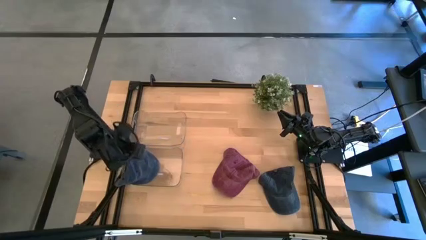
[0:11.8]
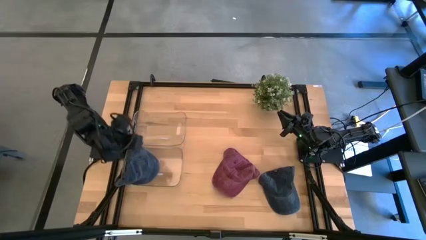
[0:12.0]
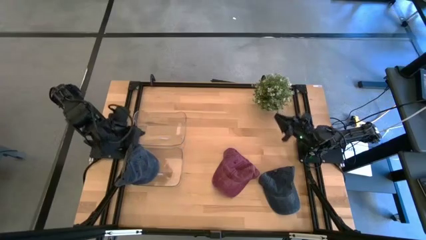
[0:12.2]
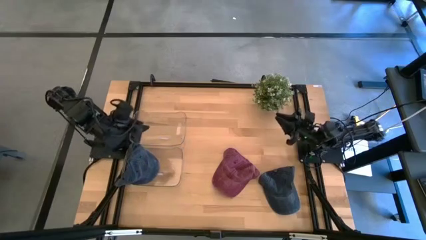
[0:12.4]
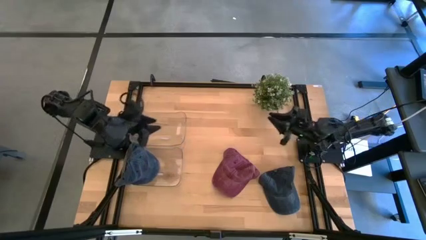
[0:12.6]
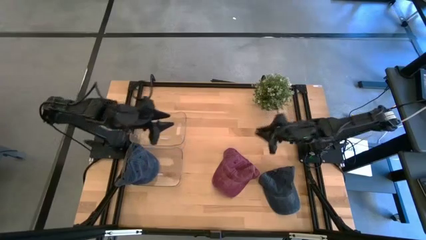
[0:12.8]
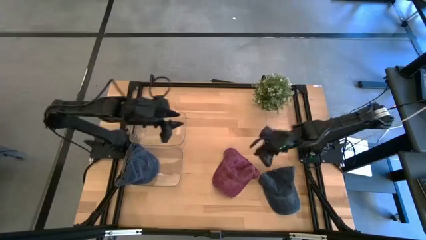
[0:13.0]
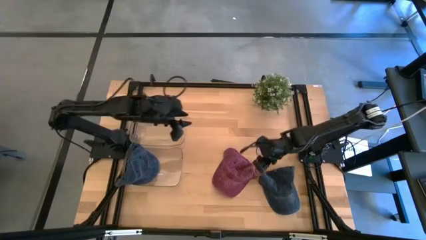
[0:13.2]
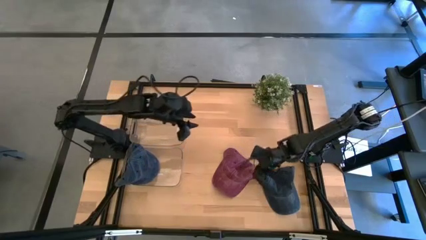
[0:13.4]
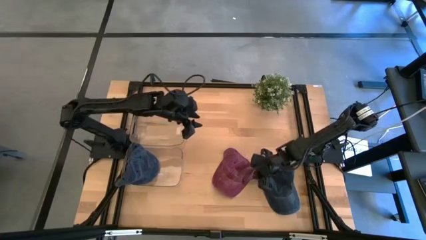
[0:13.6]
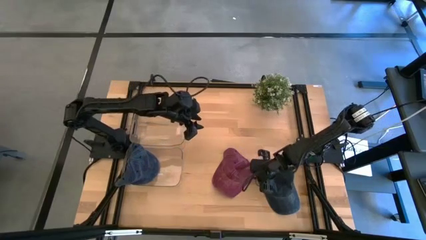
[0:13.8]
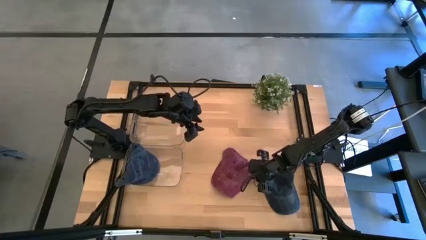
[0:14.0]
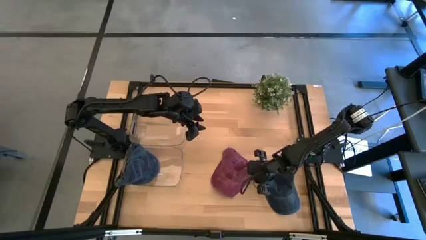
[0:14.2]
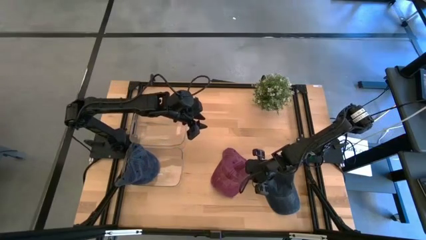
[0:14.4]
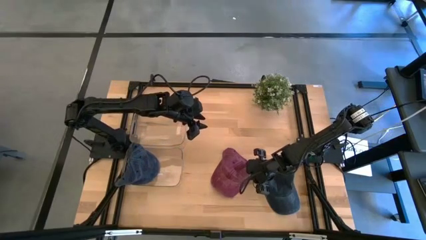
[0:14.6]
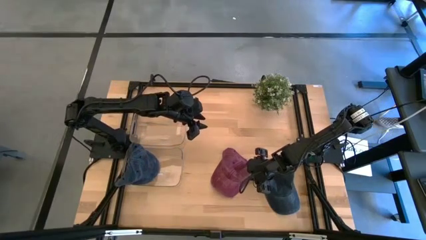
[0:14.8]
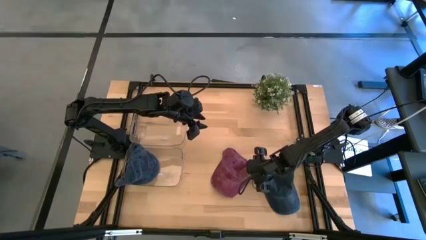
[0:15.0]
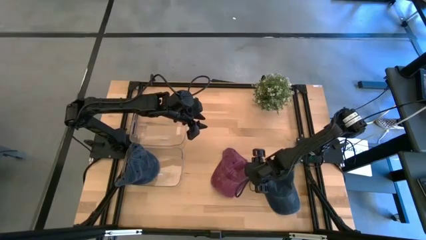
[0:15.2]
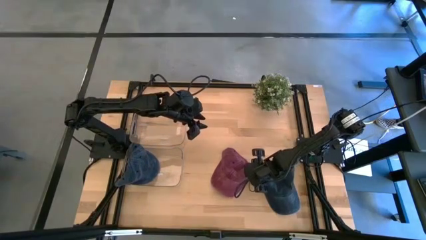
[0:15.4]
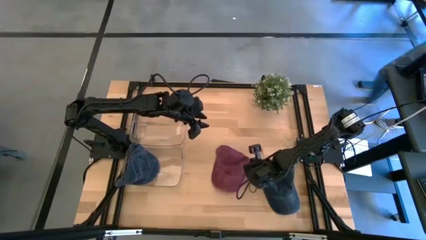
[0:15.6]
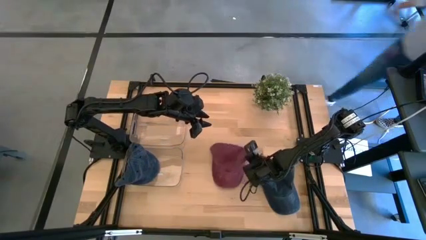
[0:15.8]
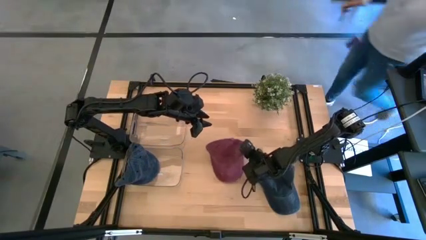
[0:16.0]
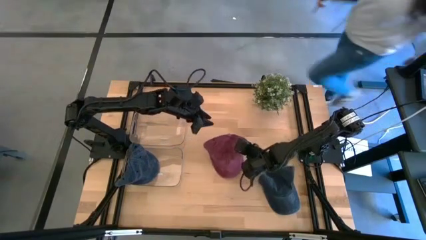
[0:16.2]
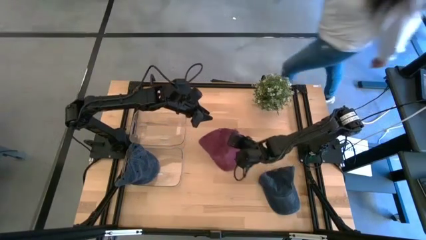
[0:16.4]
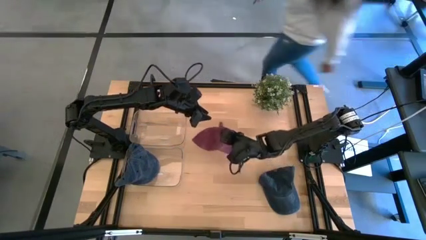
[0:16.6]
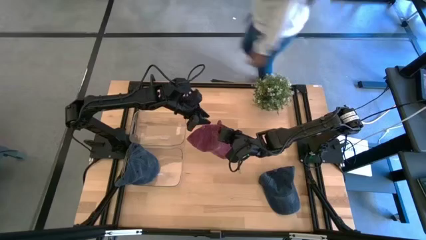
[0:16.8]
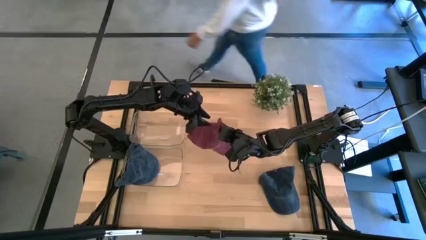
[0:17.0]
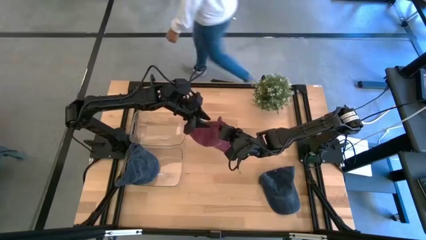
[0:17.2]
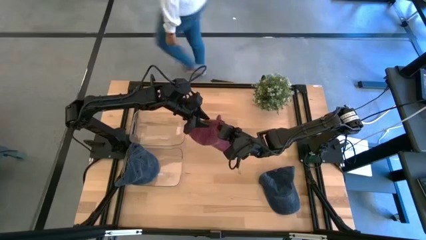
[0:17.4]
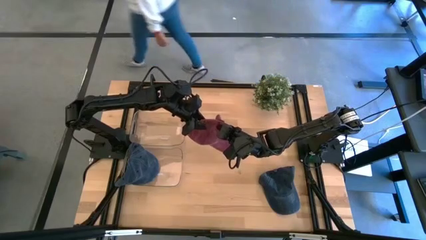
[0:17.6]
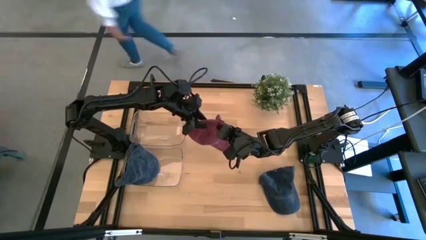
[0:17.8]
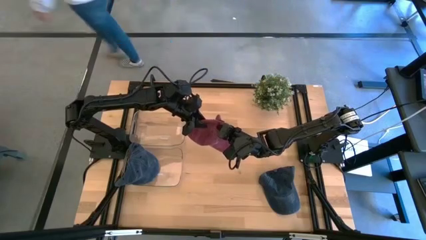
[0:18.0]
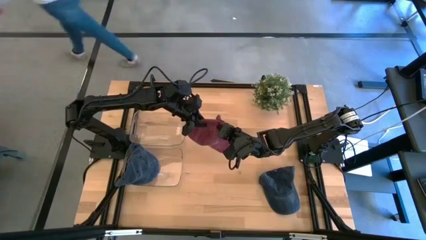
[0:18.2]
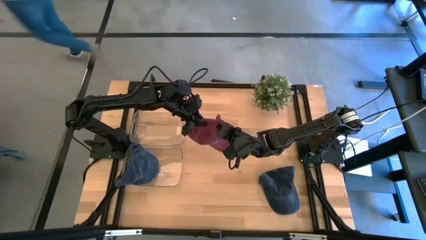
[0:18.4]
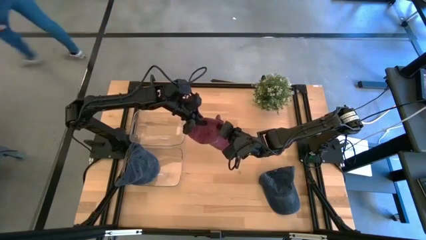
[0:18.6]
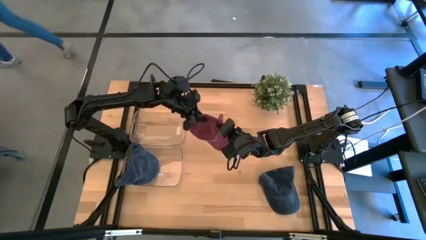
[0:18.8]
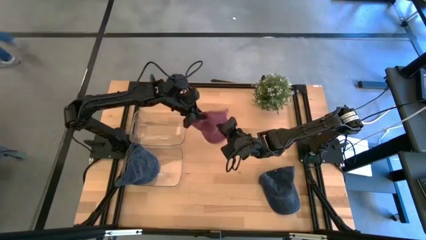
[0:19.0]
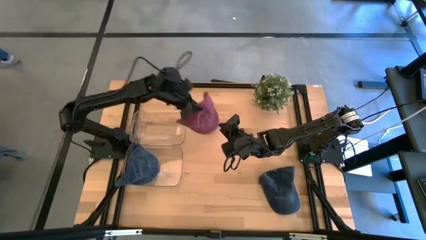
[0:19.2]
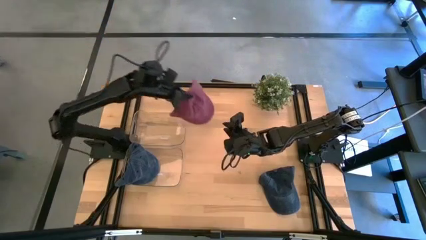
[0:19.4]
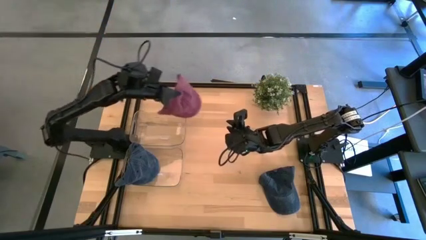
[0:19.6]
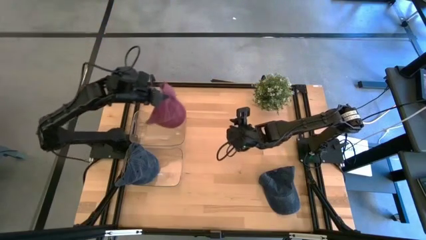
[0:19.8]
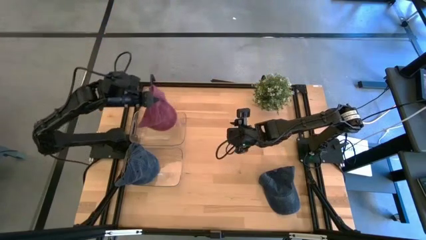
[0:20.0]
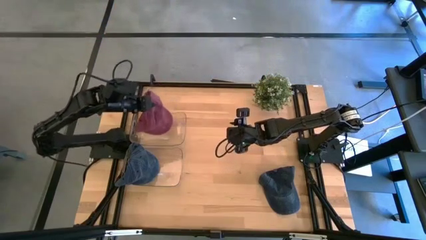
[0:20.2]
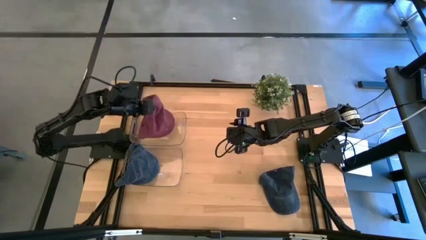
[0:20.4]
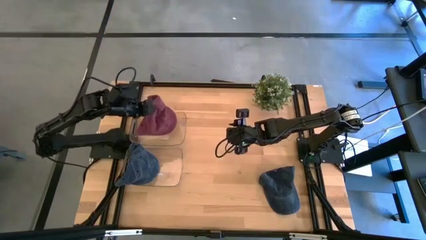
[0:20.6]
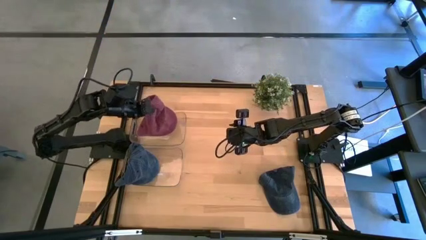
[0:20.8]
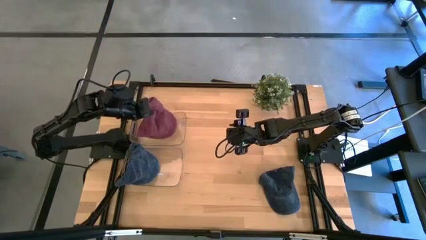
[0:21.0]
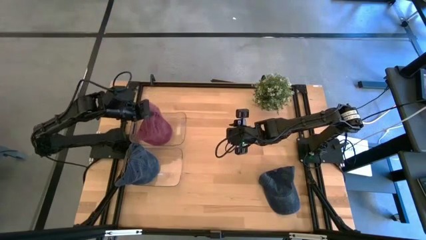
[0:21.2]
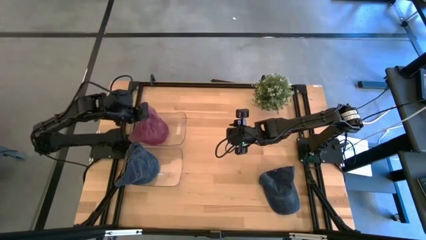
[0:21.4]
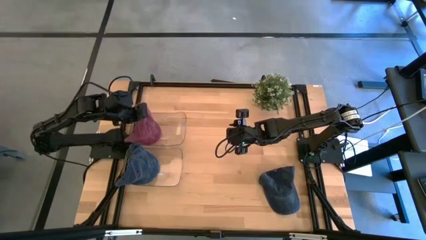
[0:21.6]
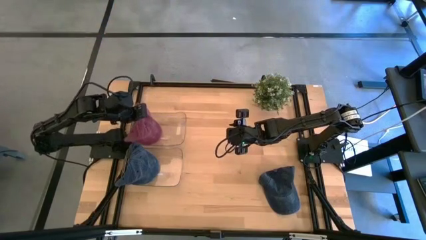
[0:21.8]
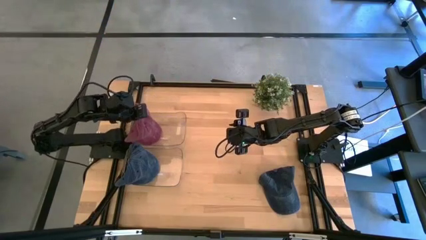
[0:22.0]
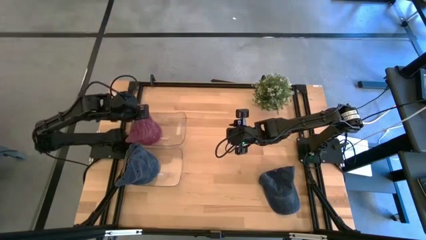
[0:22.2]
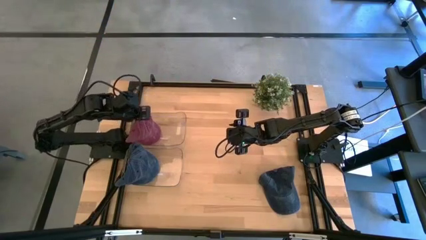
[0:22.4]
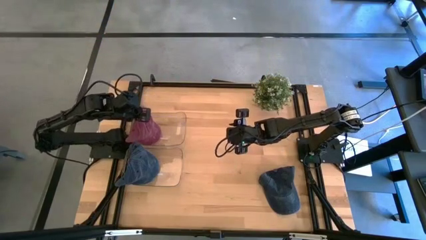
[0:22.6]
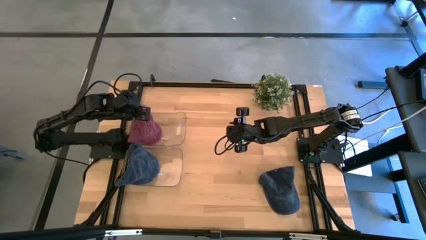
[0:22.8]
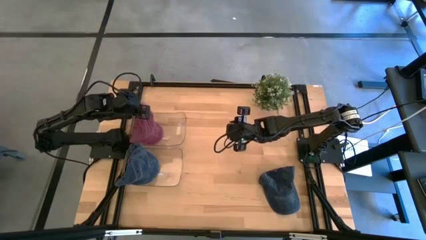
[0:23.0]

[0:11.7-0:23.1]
Task: Pick & Place hat
Put the red cap into the top transparent bin
